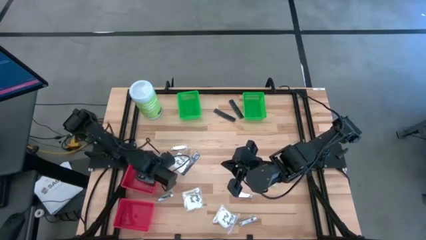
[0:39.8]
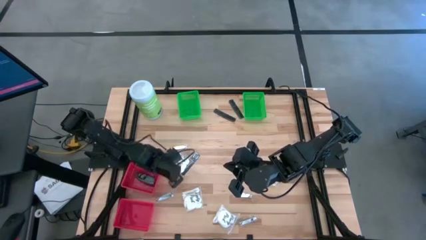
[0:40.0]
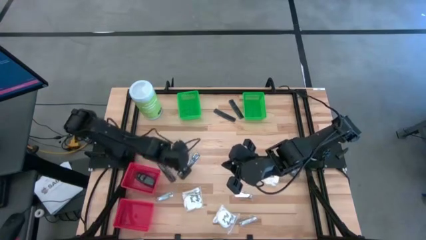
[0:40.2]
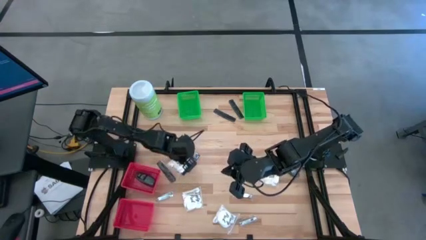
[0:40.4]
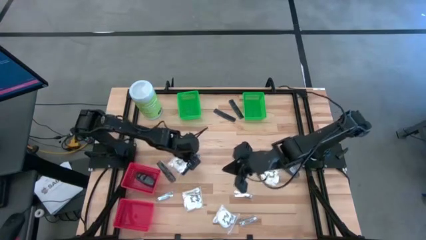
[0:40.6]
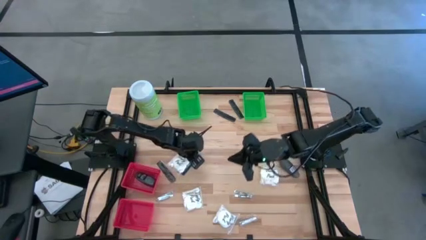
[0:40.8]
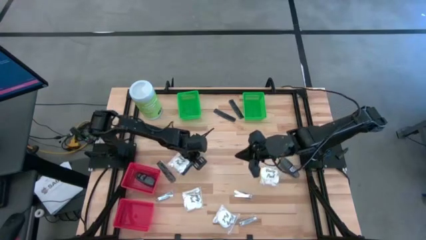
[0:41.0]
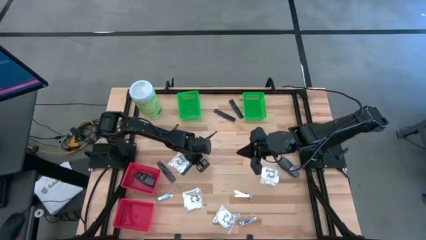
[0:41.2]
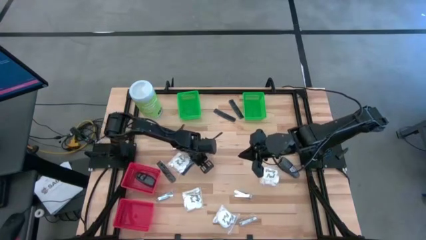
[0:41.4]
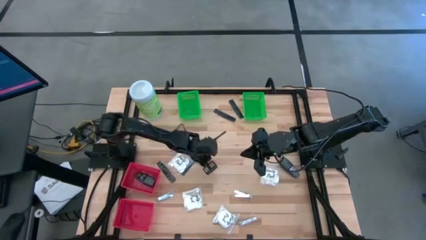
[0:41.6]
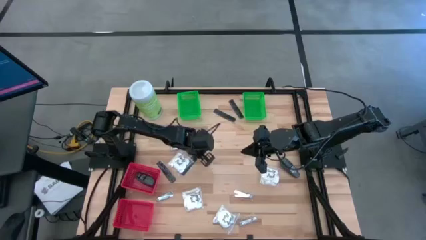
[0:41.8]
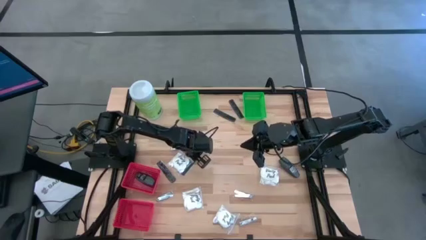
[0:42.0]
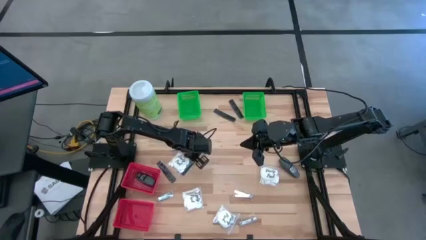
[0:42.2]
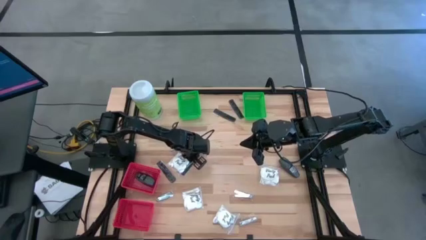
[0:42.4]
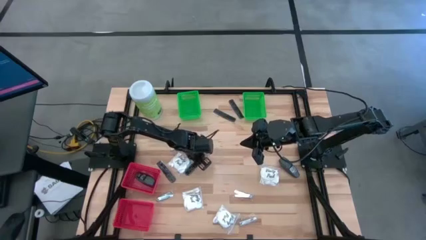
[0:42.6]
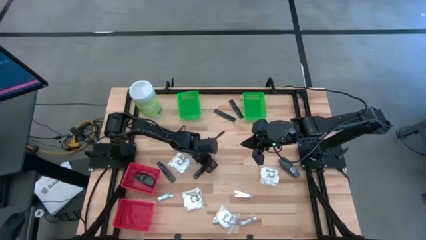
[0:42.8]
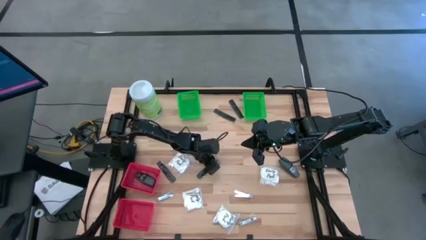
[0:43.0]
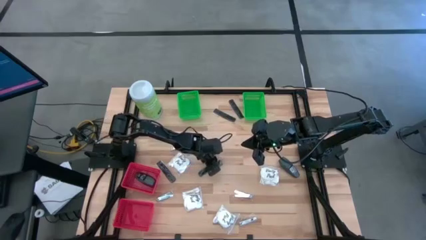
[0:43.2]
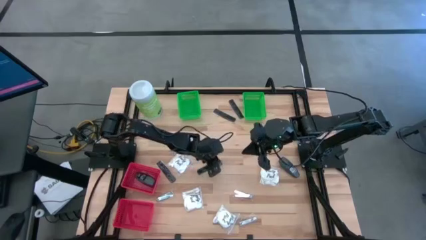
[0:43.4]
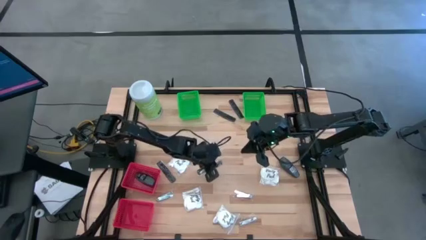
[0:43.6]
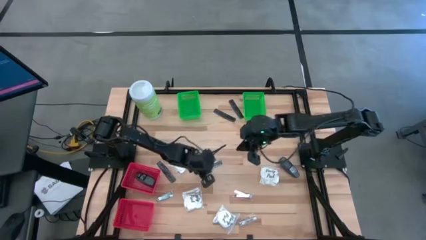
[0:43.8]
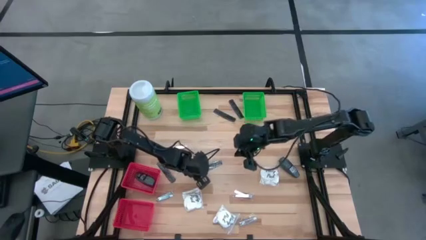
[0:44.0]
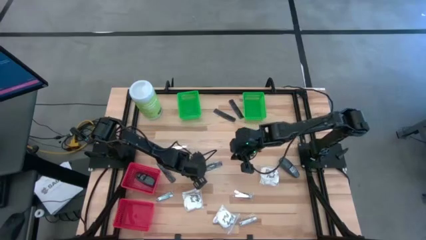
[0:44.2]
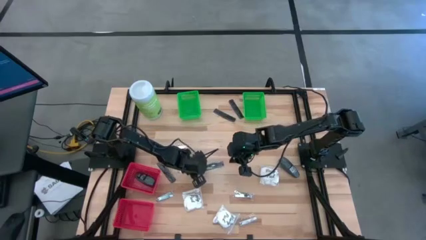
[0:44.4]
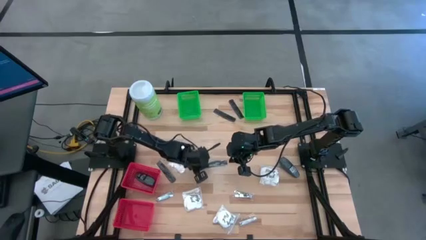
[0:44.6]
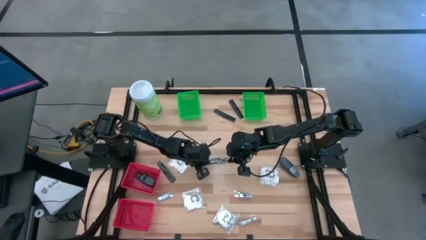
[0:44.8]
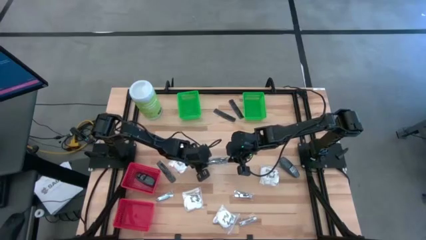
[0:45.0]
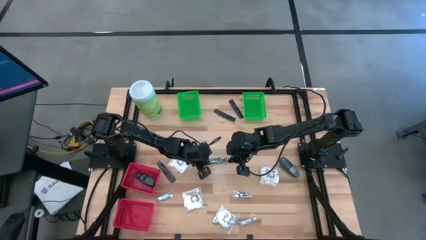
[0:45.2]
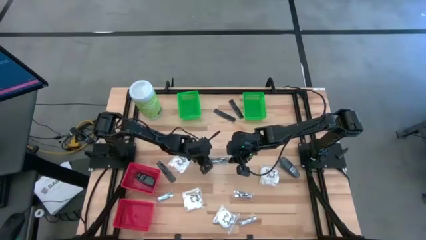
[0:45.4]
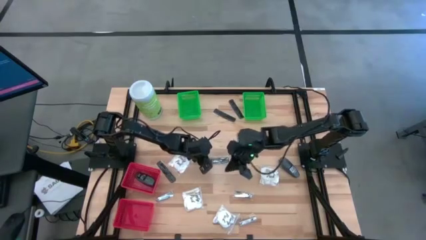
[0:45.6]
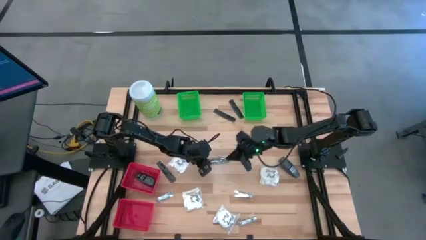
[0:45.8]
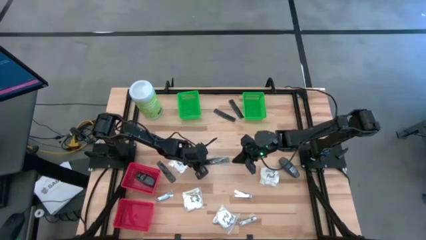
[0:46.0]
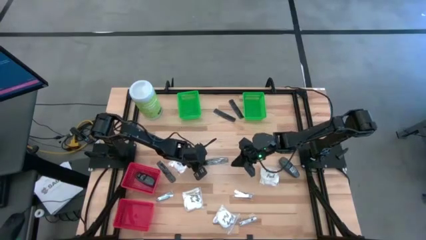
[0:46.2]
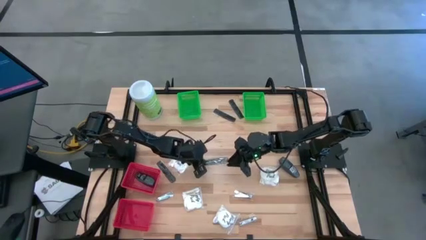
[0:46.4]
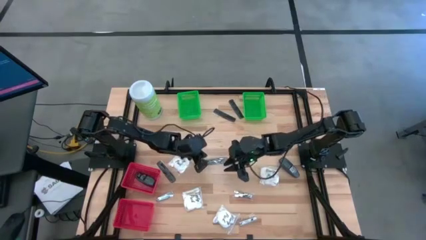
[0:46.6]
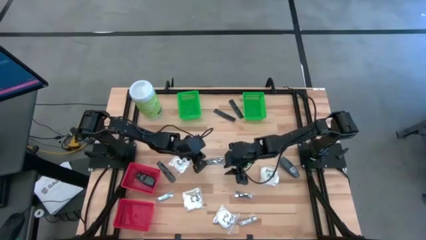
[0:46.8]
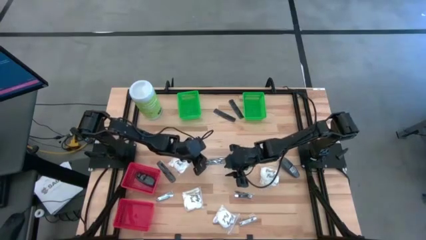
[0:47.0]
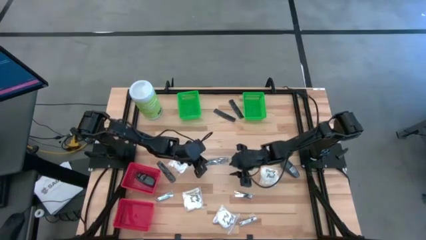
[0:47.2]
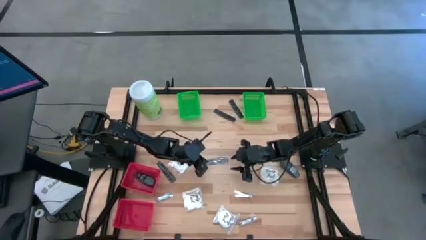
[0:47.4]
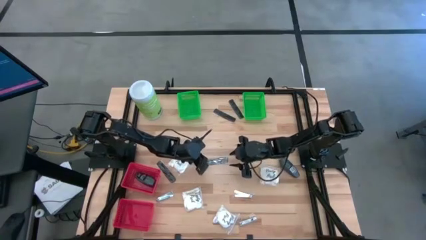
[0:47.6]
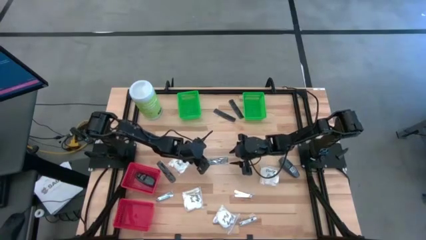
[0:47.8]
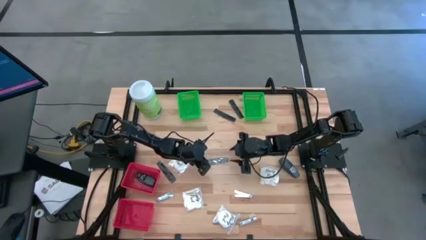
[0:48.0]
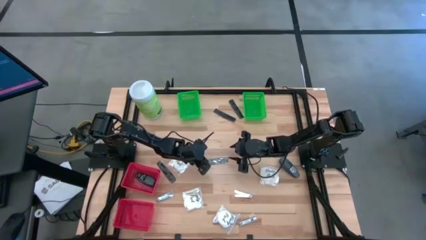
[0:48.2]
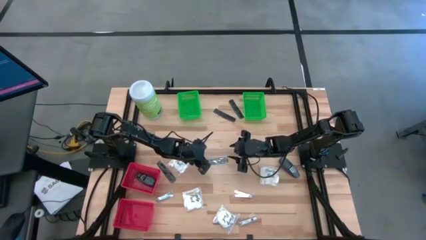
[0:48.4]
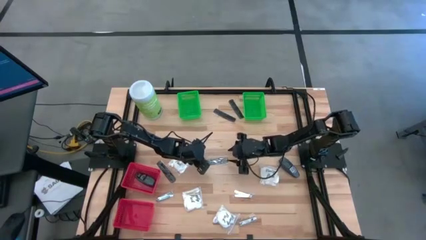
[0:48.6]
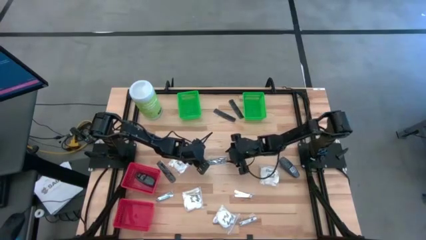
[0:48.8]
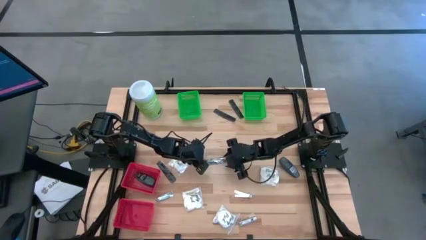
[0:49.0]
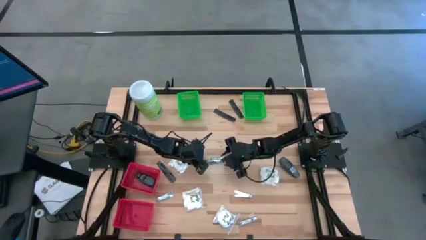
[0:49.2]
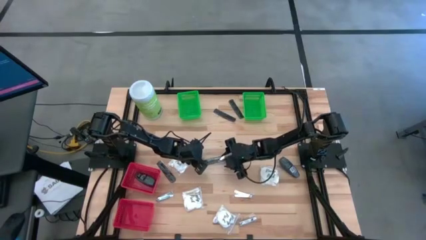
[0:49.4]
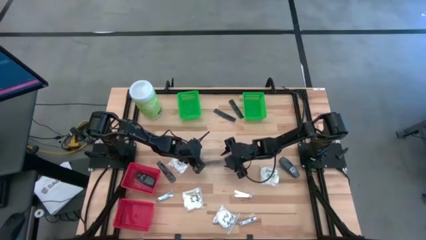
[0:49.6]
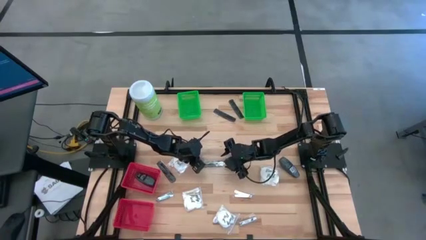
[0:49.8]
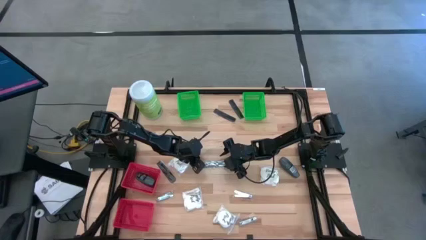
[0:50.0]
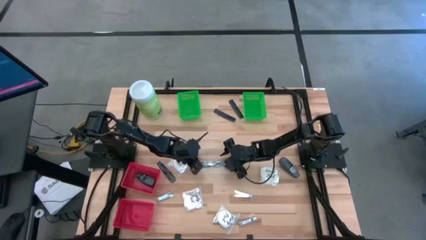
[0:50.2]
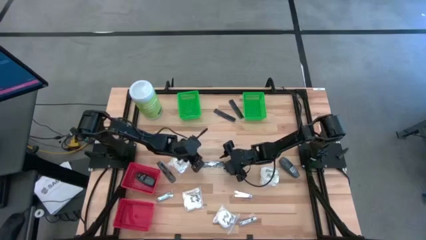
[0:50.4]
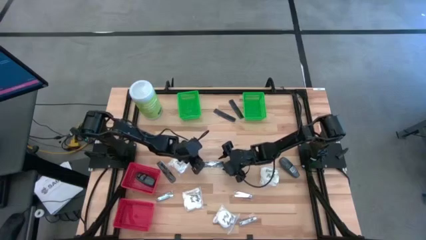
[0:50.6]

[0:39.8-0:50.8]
Task: Pick & Place Travel size toiletries
Put the black comb into the bottom red basket

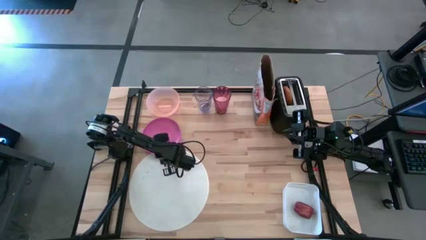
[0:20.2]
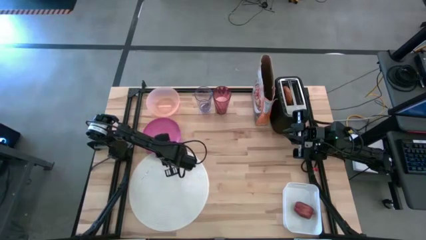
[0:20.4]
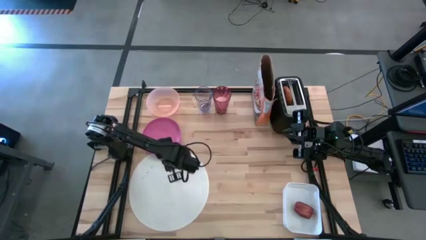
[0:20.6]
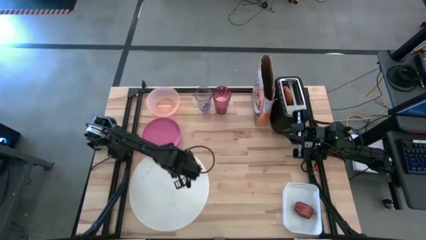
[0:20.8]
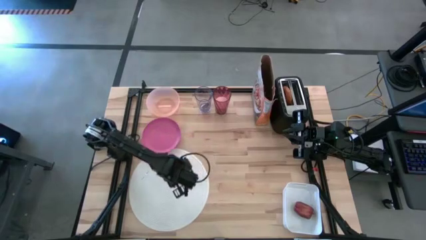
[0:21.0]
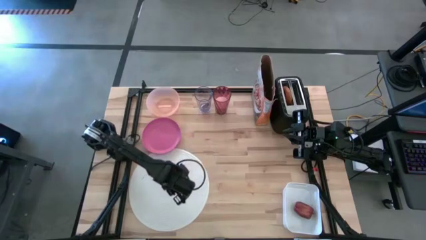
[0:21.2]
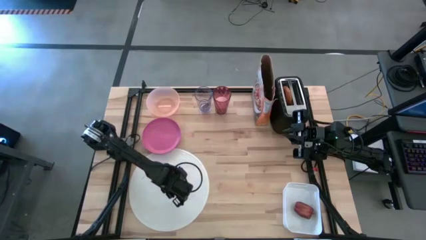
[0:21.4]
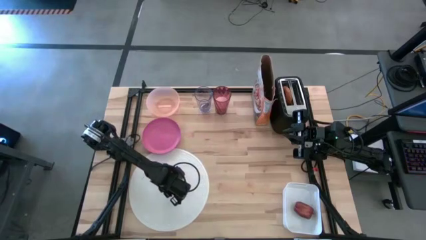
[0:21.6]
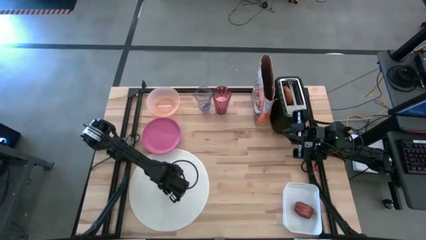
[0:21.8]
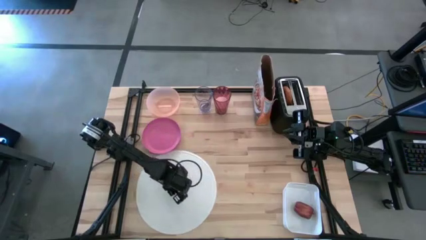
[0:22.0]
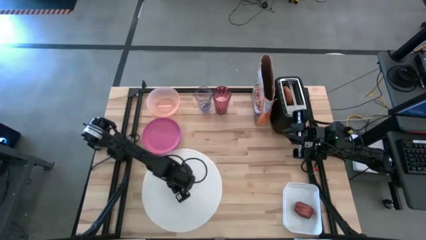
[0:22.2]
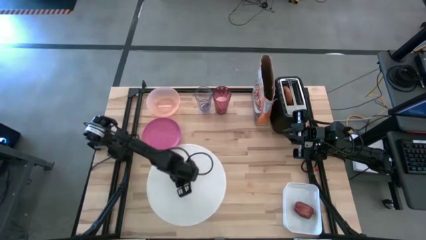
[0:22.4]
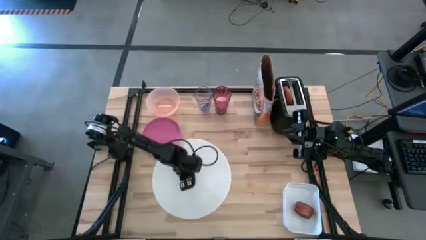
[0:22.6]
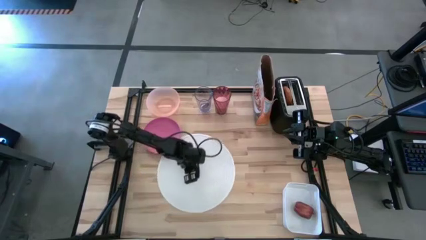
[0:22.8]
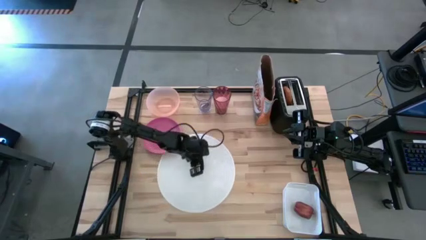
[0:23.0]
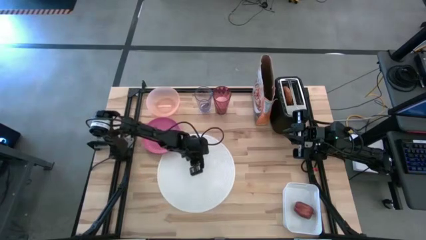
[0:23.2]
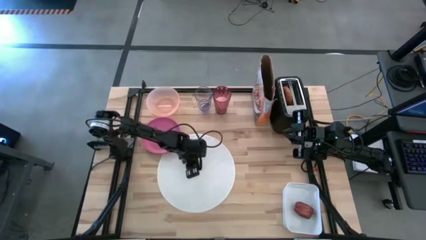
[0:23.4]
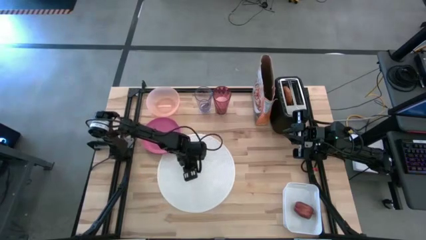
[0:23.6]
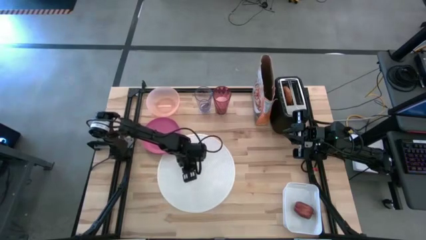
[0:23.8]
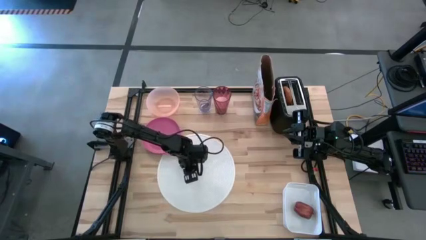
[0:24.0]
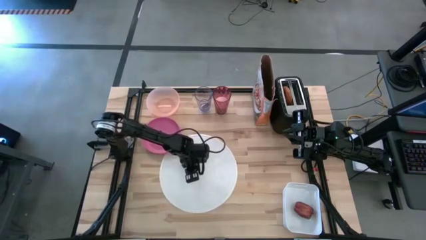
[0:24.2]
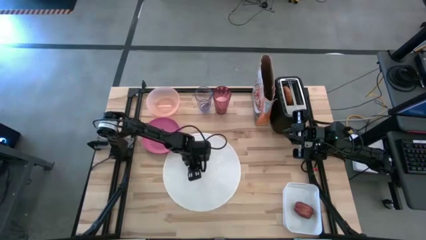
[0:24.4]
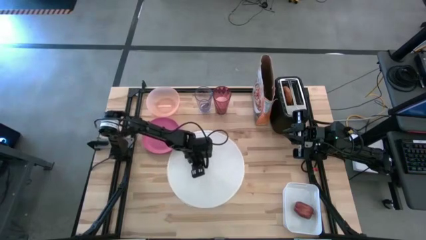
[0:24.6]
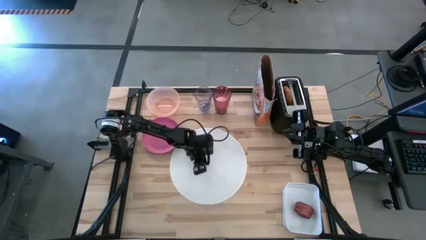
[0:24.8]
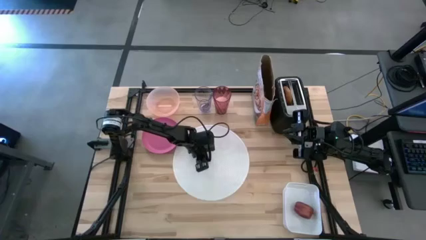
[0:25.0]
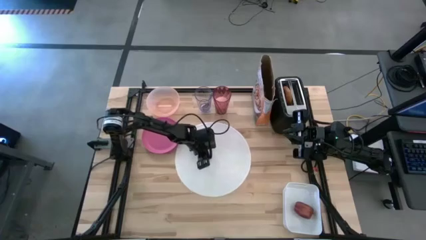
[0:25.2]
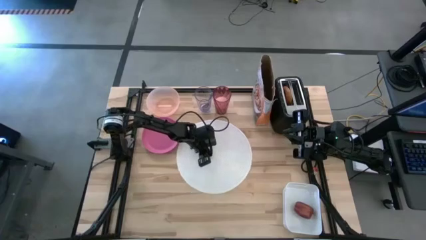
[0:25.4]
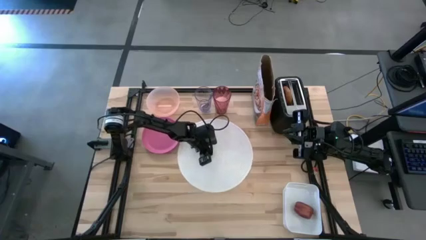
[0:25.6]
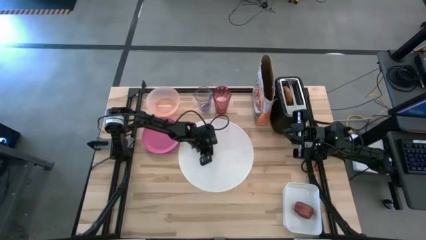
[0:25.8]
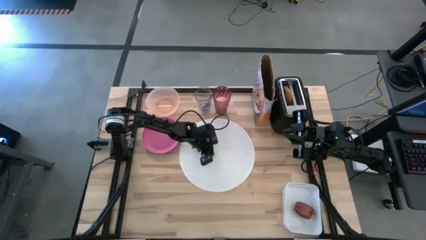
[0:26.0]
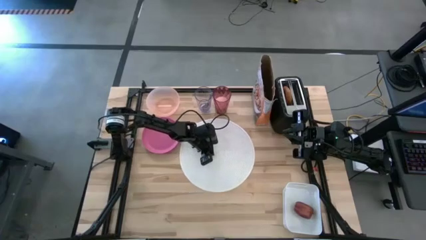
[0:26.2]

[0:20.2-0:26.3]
Task: Arrange a breakfast setting
Move the white table mat to the center of the table
